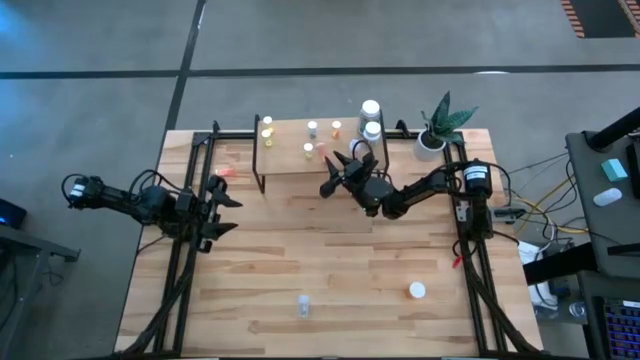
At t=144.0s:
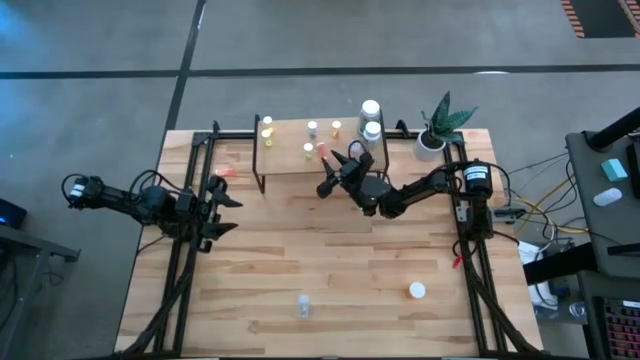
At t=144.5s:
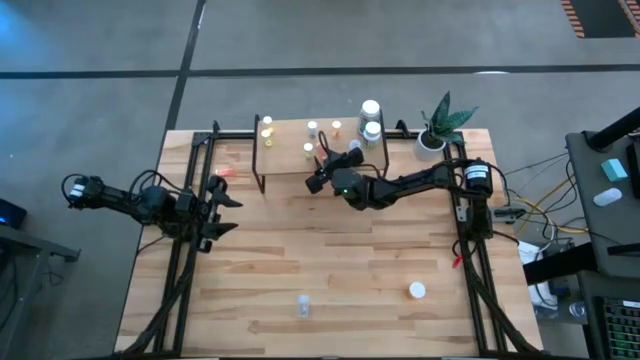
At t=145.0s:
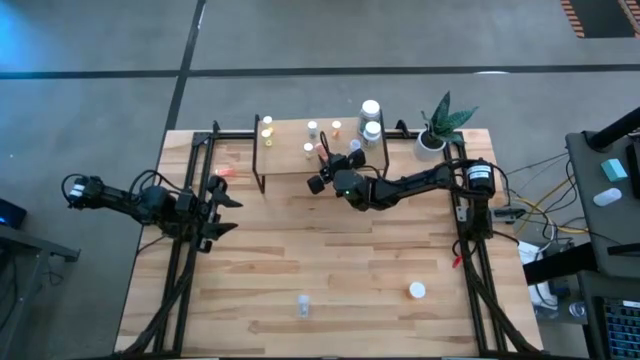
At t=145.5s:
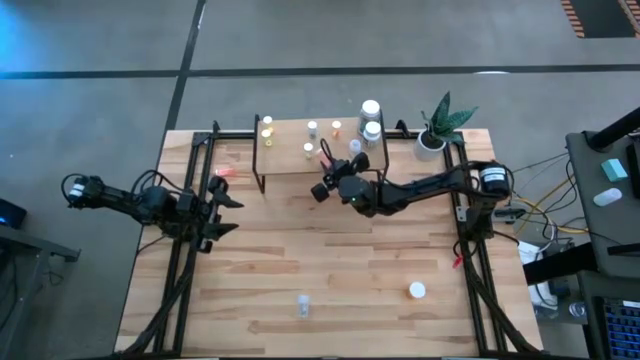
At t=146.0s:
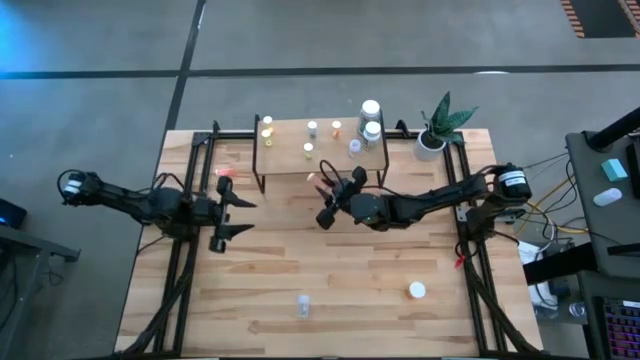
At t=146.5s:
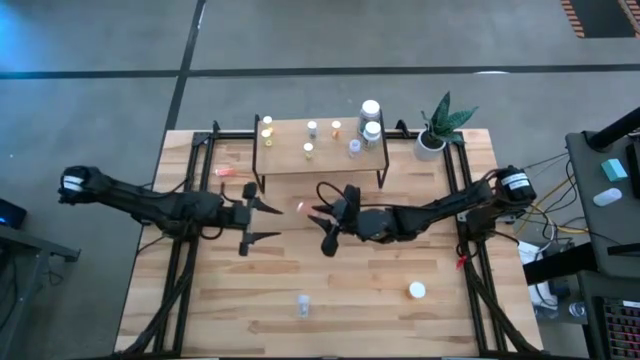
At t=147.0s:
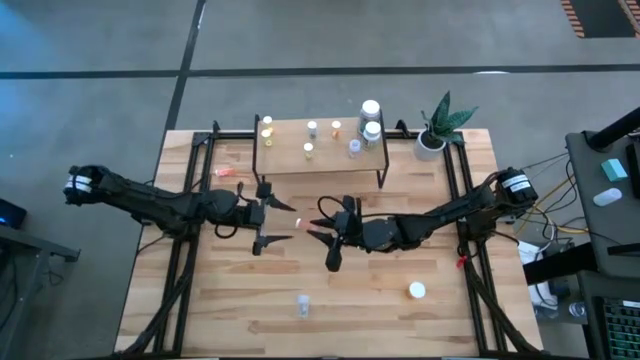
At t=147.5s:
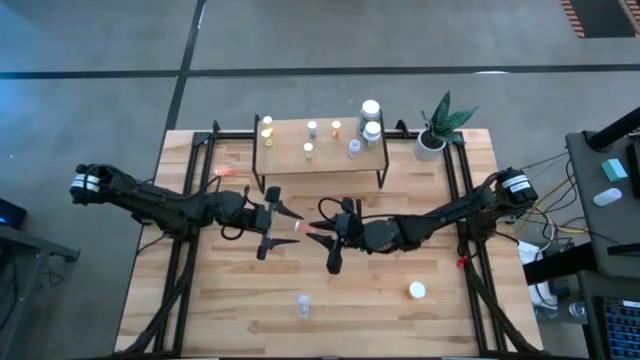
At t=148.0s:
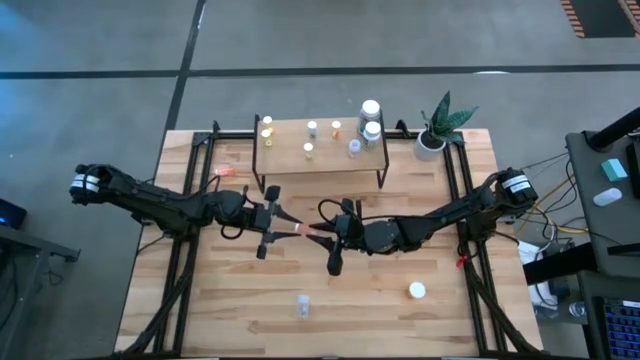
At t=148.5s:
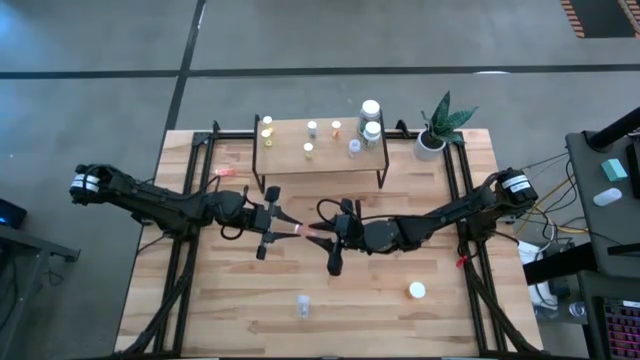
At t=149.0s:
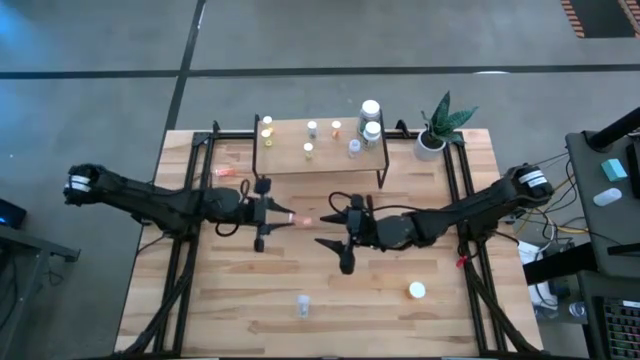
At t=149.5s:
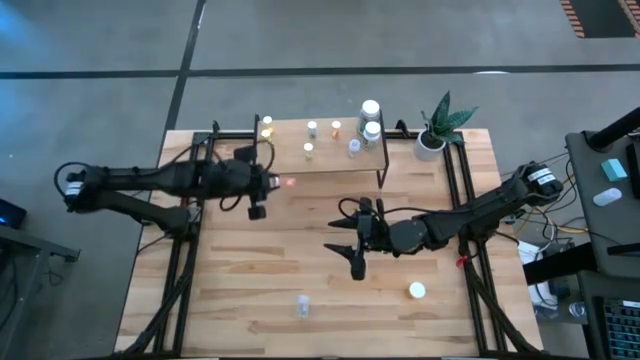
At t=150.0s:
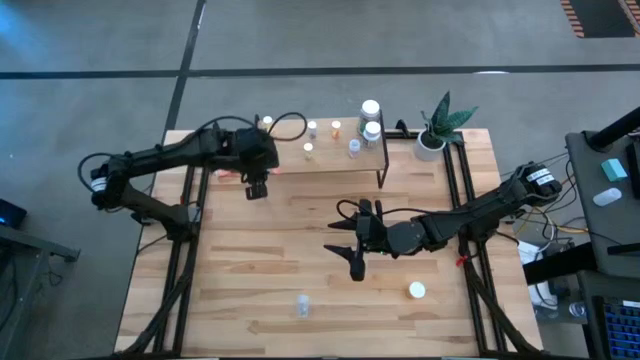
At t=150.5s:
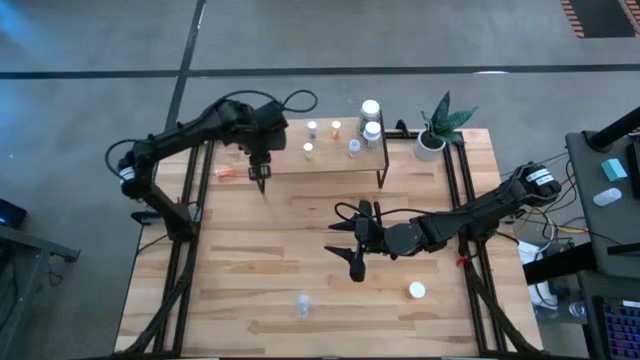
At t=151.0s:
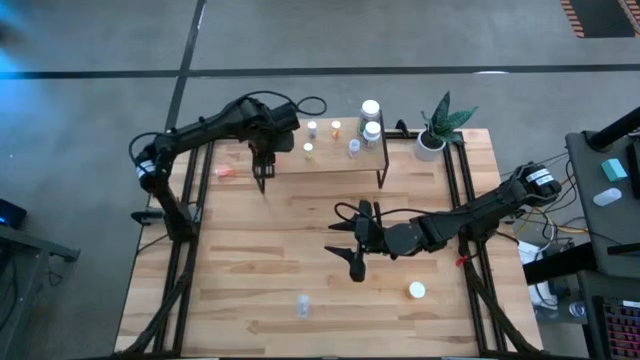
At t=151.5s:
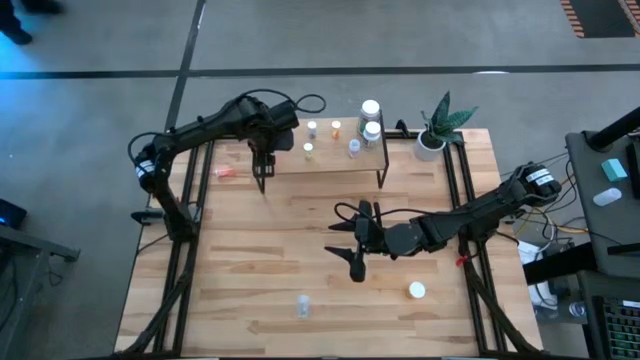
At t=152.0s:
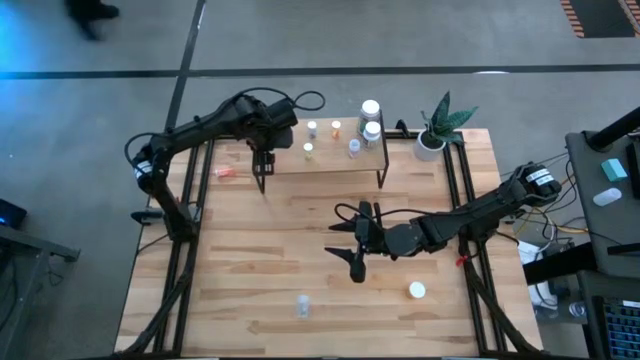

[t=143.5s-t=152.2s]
Task: Pick and place medicine bottles onto shelf by color
Put the pink pill bottle on the shelf

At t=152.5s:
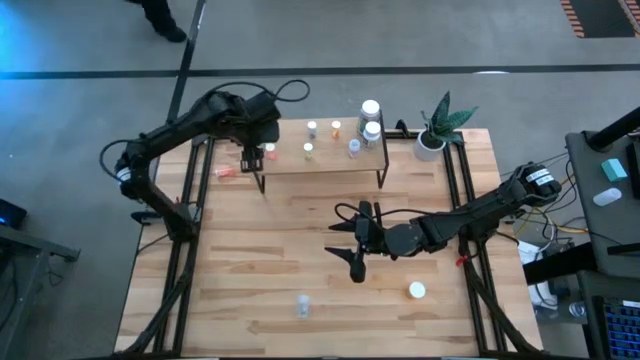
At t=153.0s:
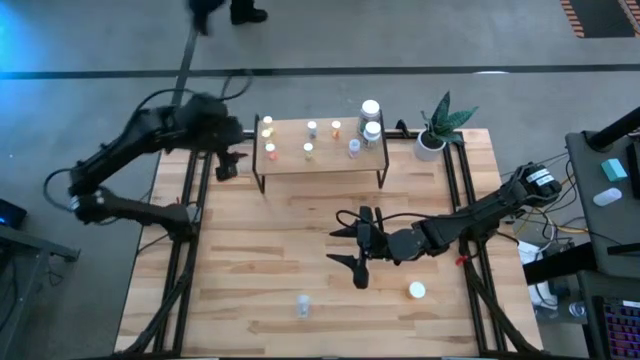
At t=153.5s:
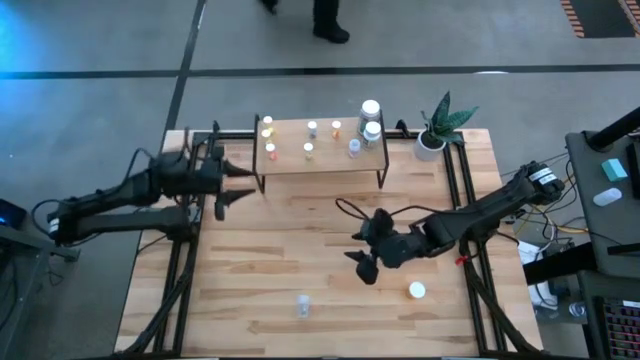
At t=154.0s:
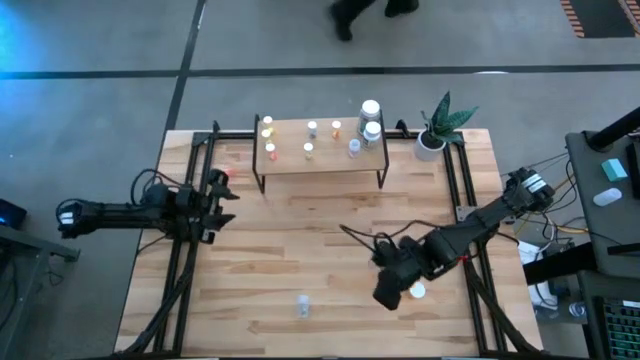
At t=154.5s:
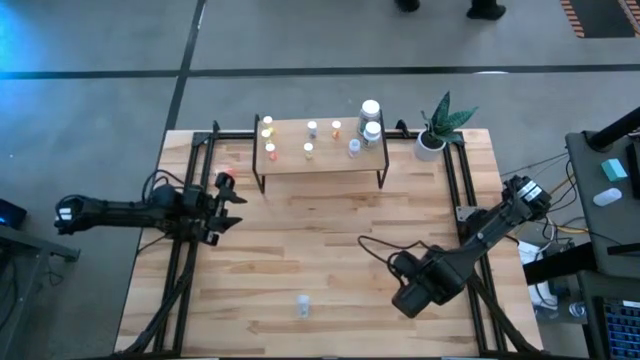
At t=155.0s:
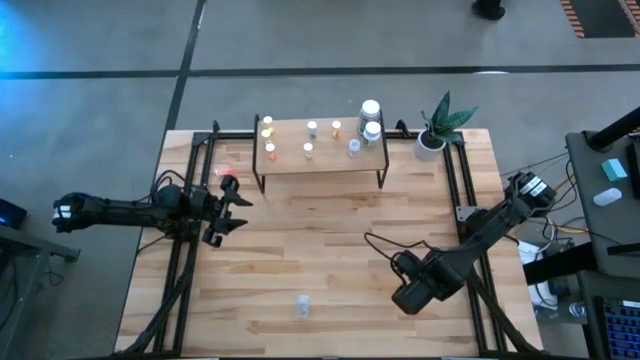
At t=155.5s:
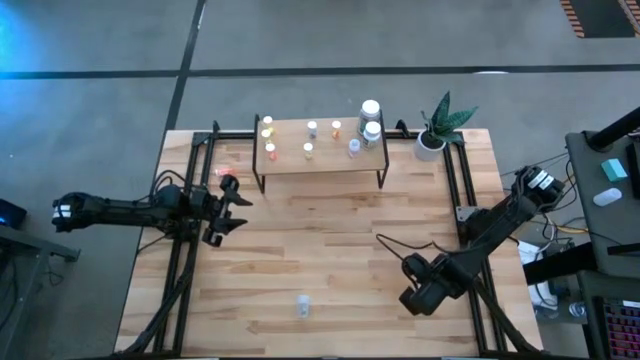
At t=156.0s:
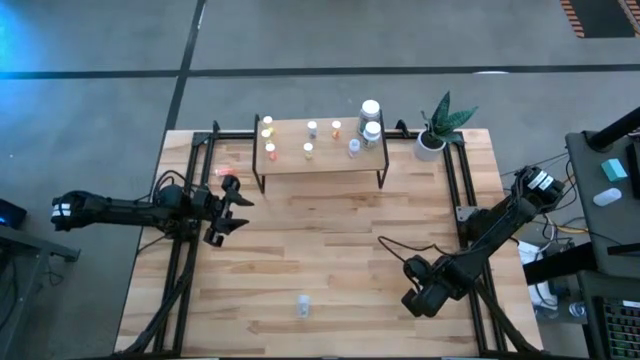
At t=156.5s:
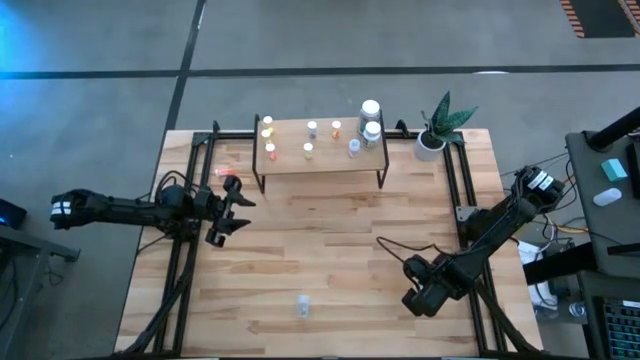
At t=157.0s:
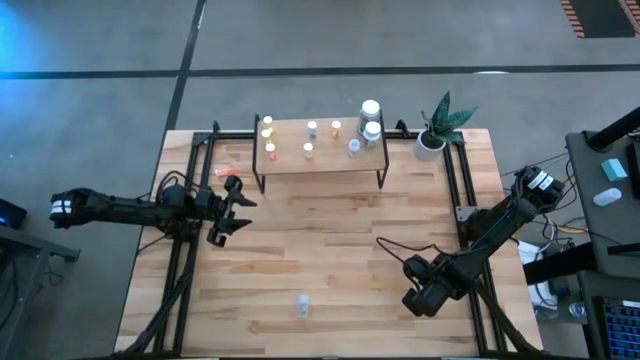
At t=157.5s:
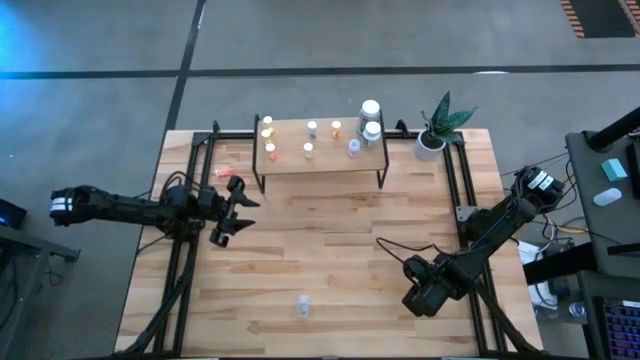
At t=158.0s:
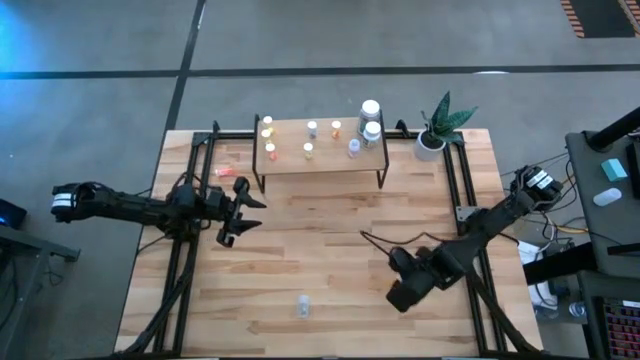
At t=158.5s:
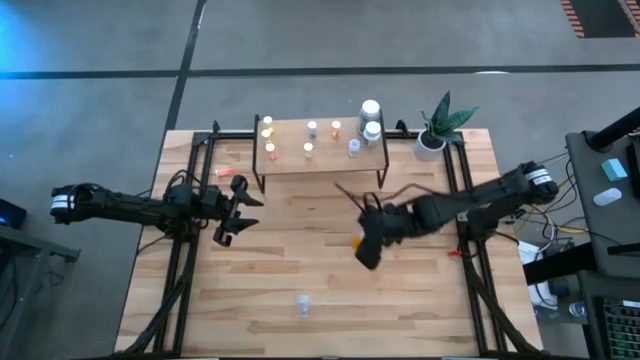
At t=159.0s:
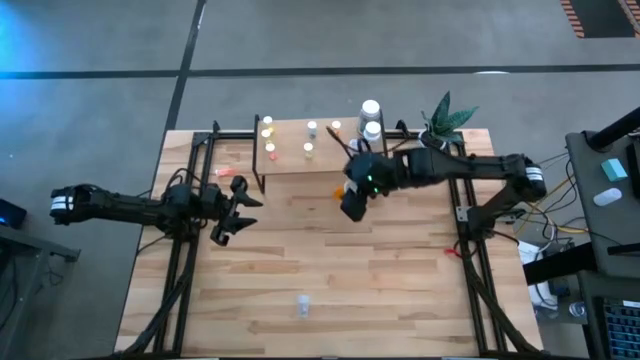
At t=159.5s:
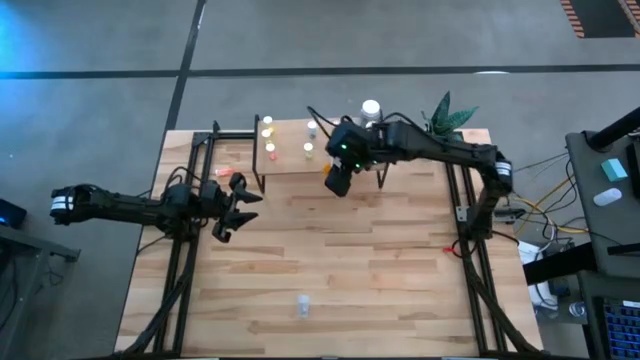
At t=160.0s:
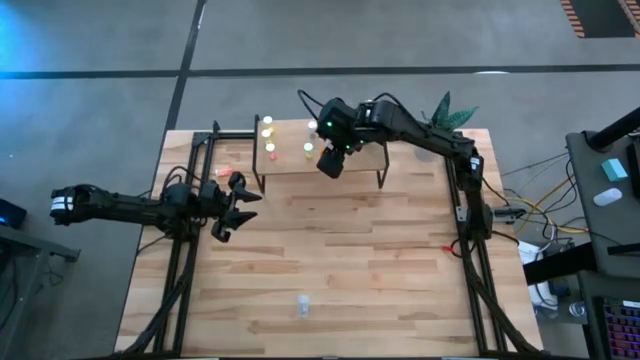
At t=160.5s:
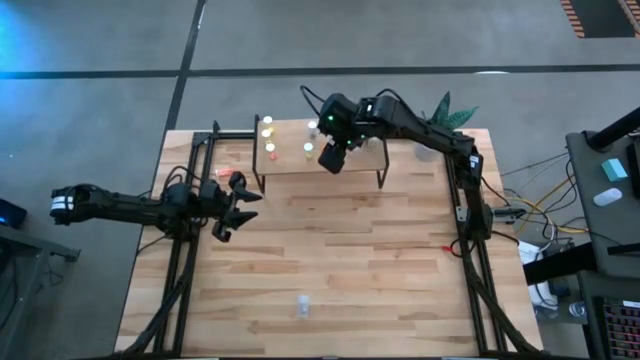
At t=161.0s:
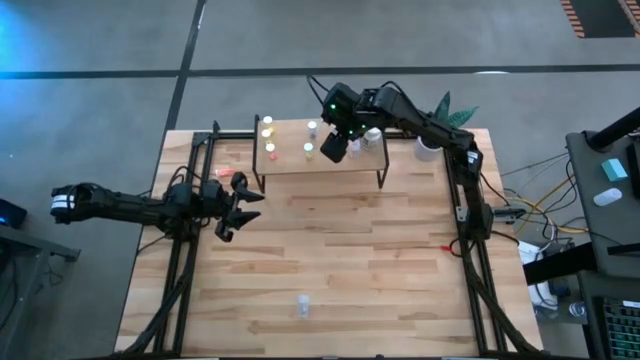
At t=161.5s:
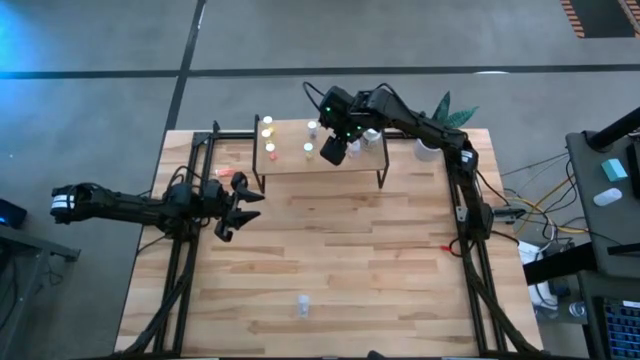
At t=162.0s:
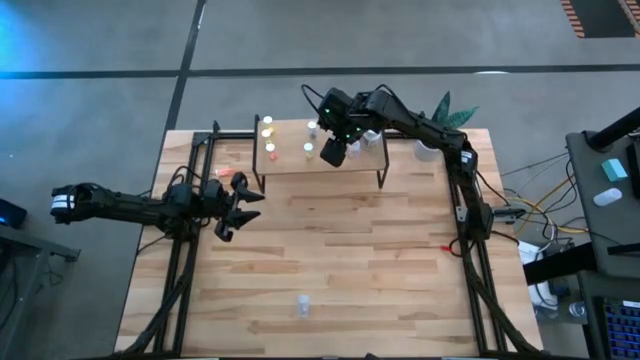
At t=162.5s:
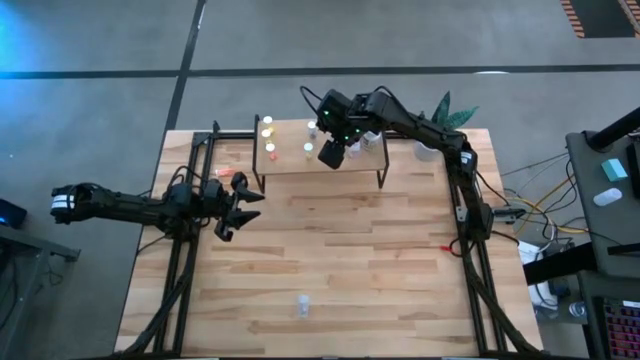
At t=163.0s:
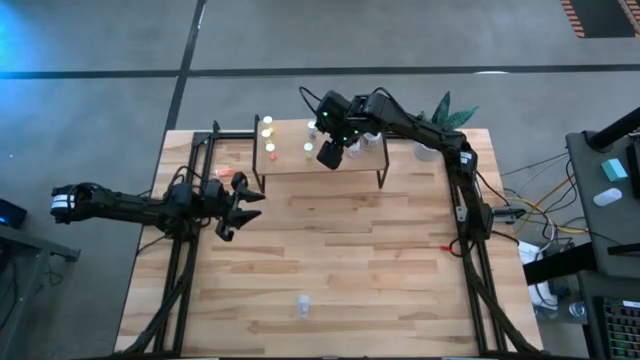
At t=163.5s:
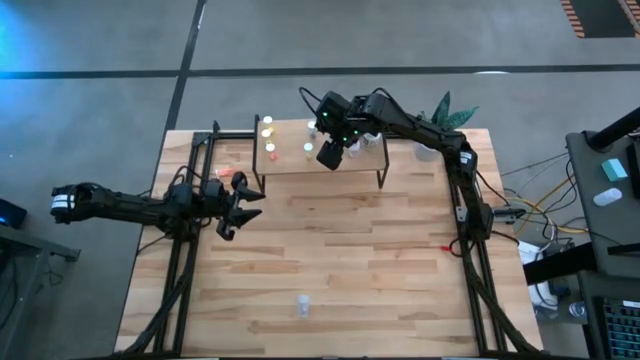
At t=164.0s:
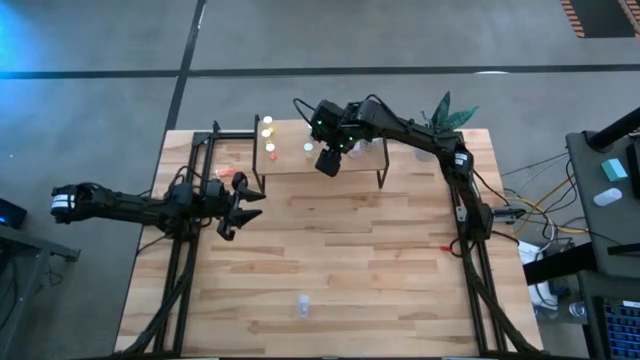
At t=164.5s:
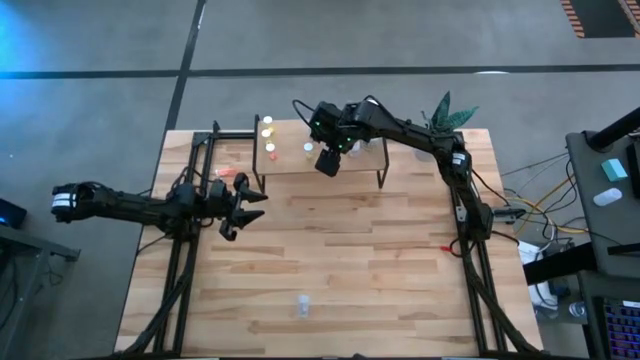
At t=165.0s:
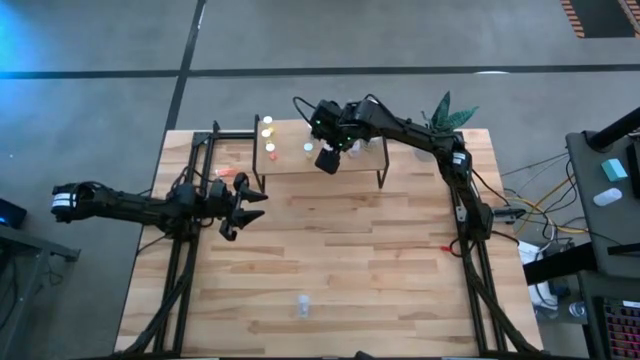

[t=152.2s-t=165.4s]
Put the orange pill bottle on the shelf

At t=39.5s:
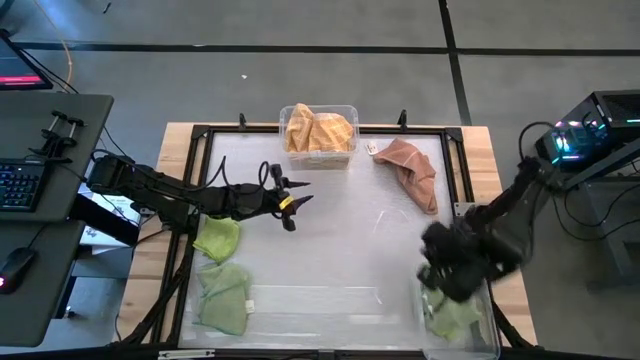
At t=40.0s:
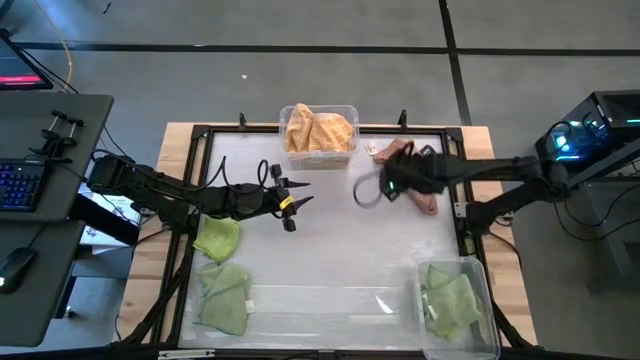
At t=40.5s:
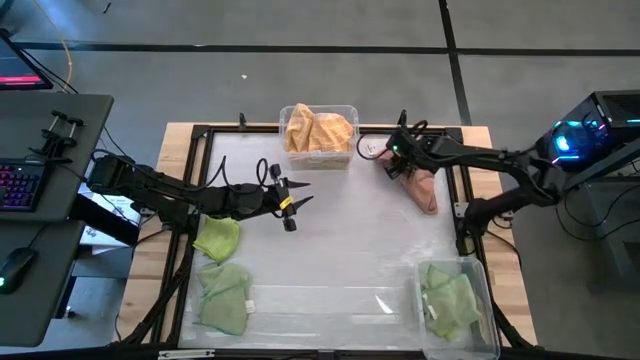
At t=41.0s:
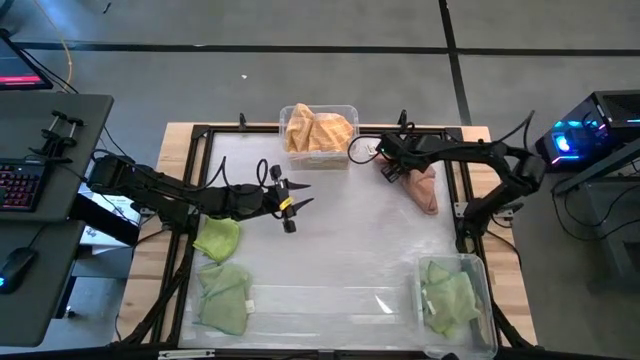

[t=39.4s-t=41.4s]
Task: Sort towels by color in basket
Put the brown towel into the top transparent bin
